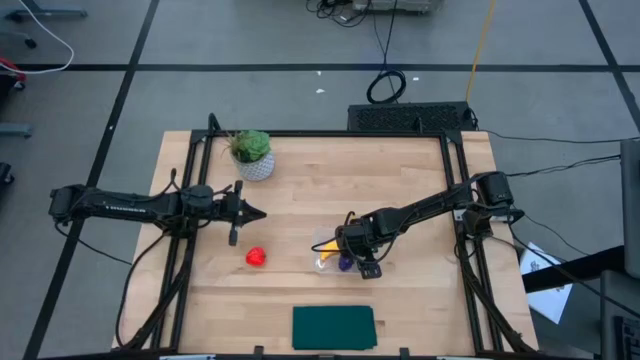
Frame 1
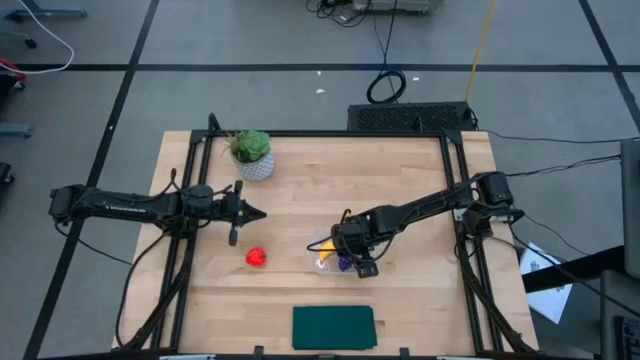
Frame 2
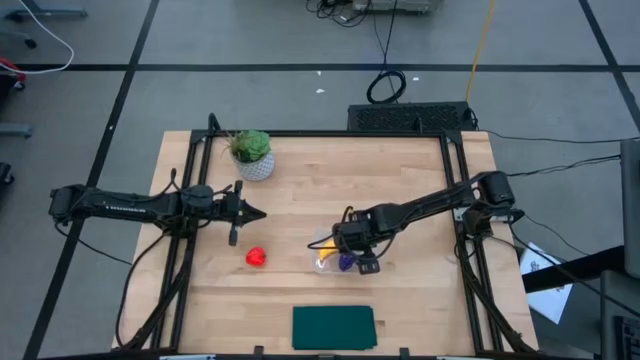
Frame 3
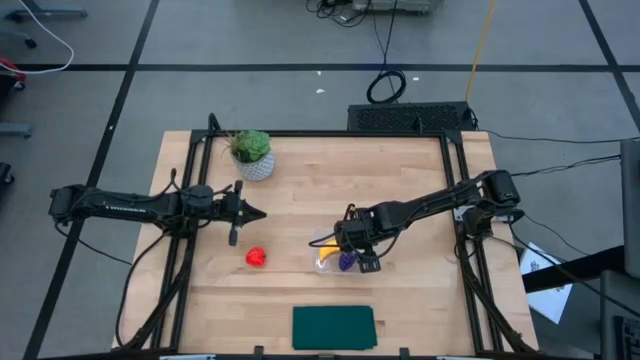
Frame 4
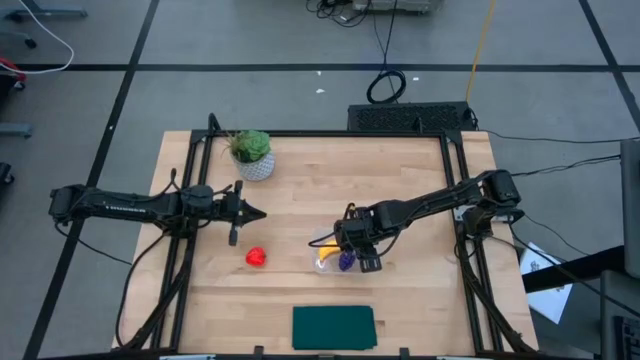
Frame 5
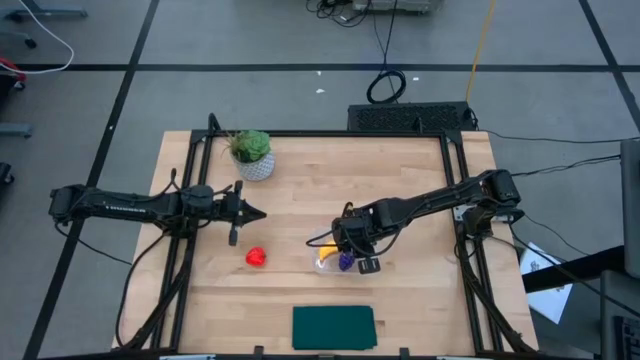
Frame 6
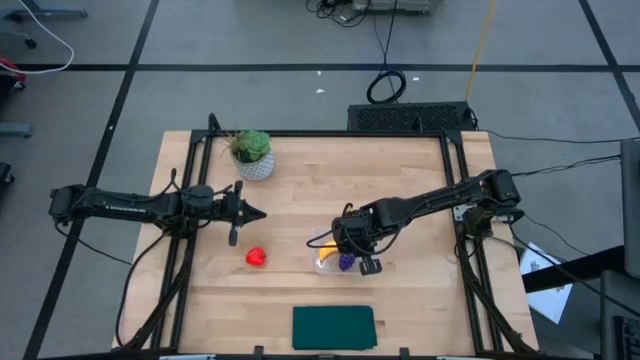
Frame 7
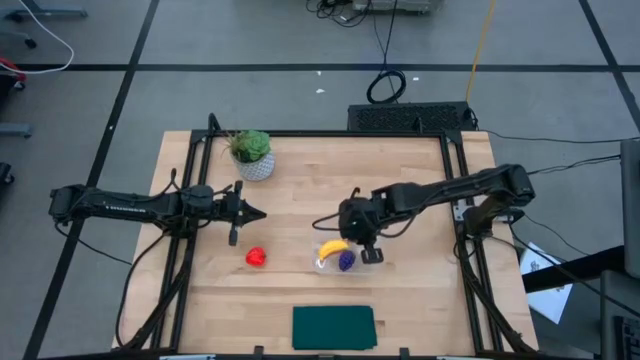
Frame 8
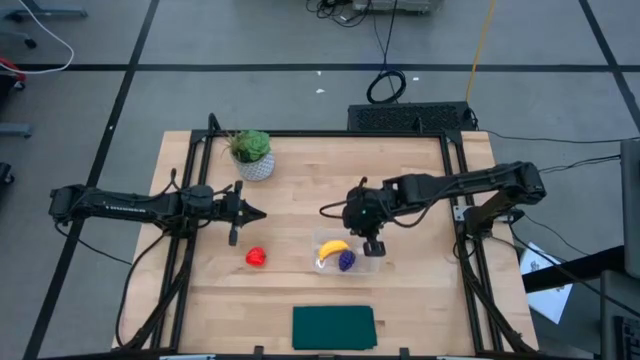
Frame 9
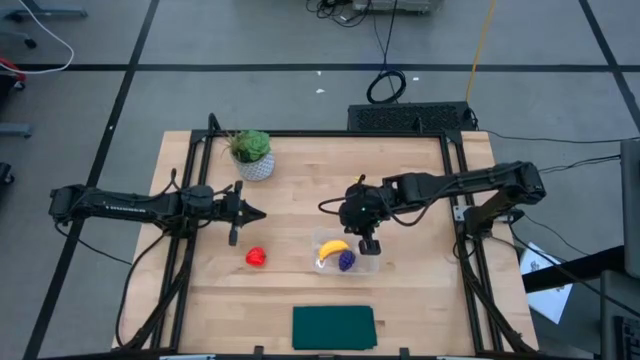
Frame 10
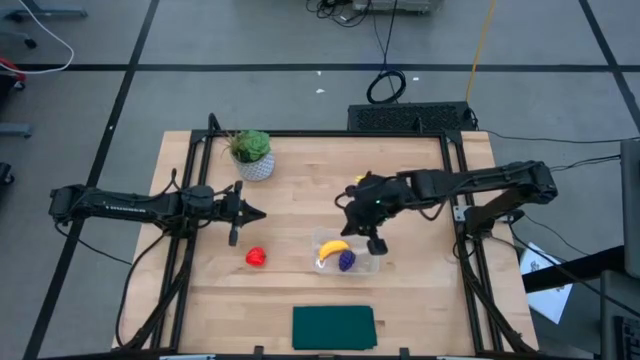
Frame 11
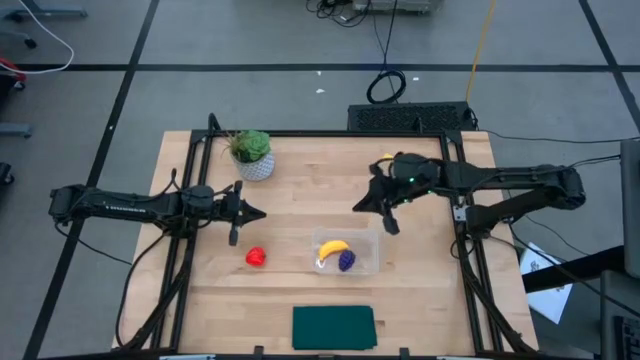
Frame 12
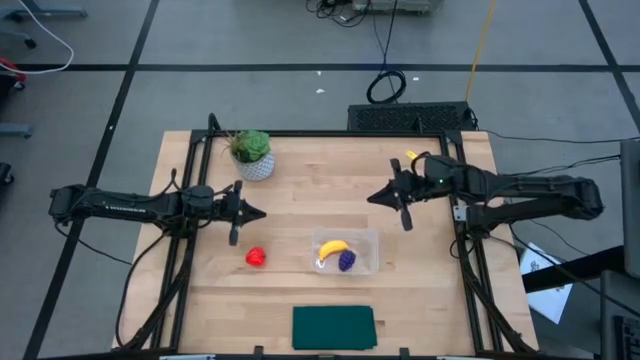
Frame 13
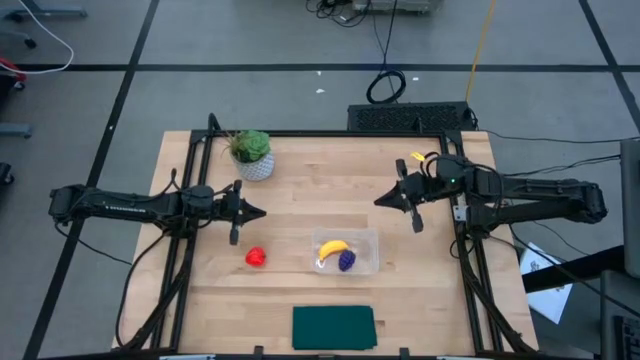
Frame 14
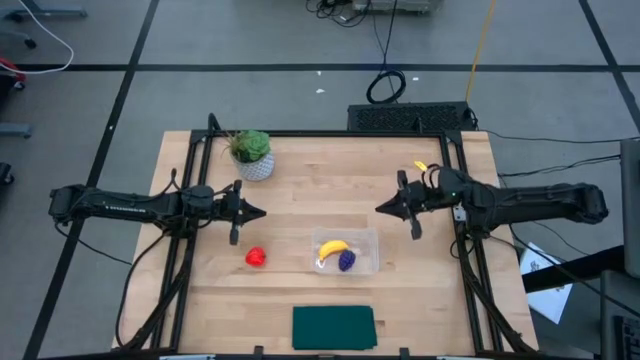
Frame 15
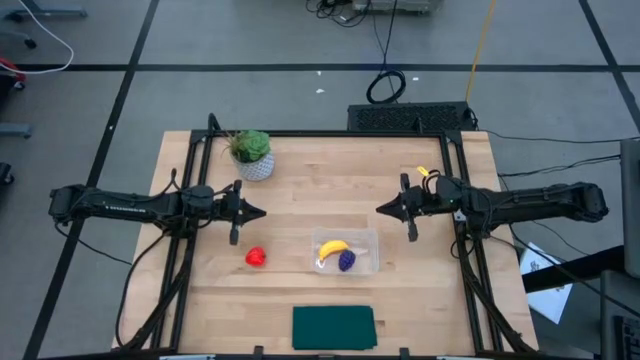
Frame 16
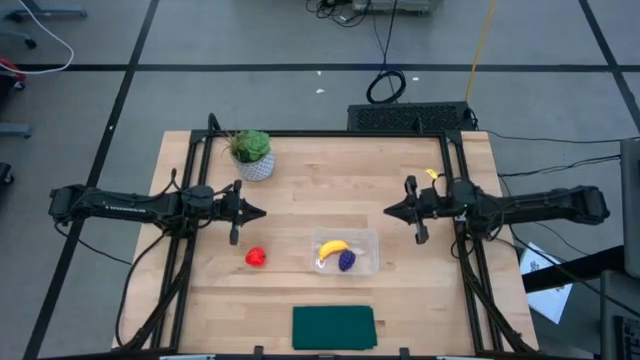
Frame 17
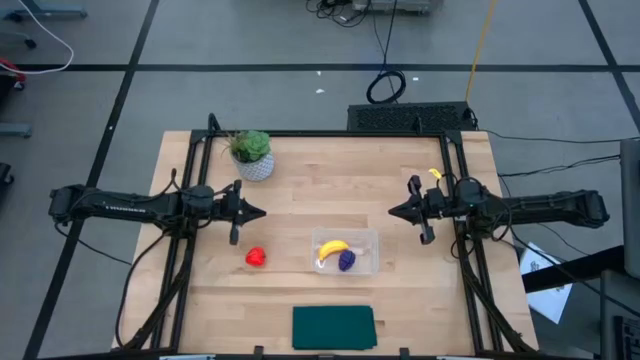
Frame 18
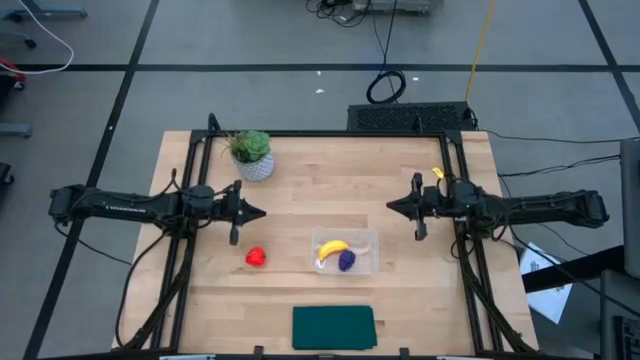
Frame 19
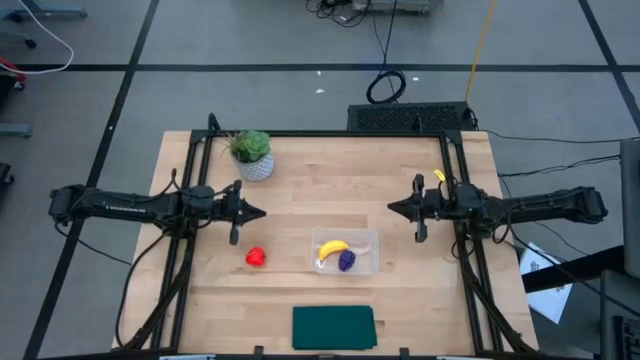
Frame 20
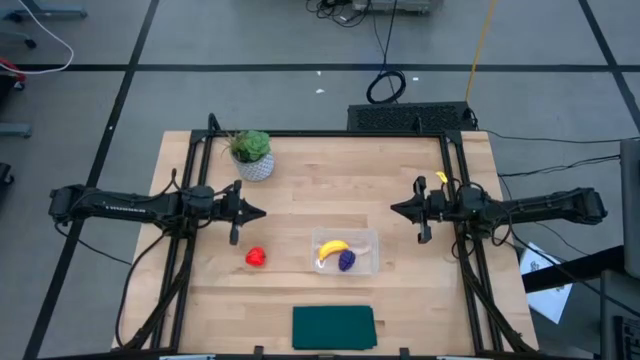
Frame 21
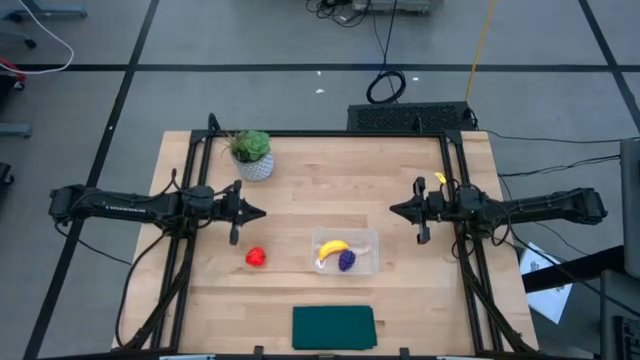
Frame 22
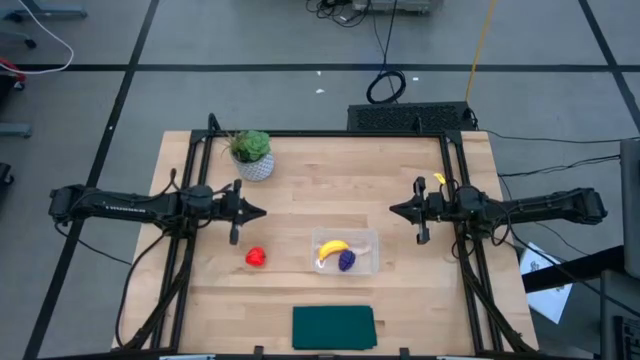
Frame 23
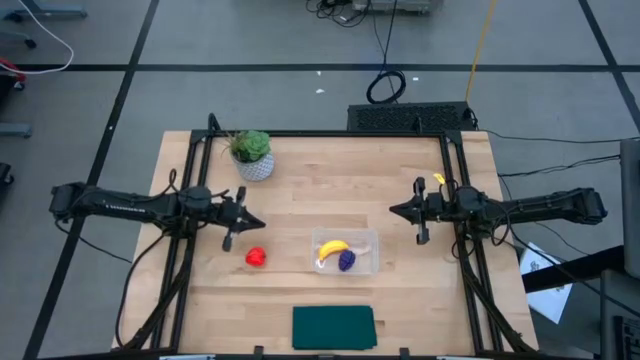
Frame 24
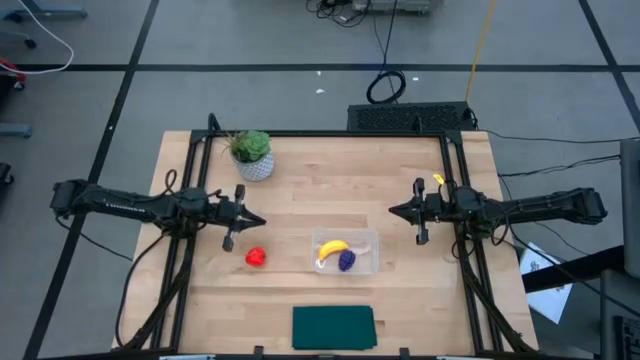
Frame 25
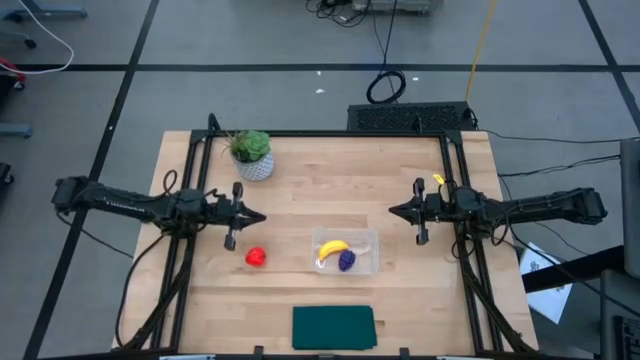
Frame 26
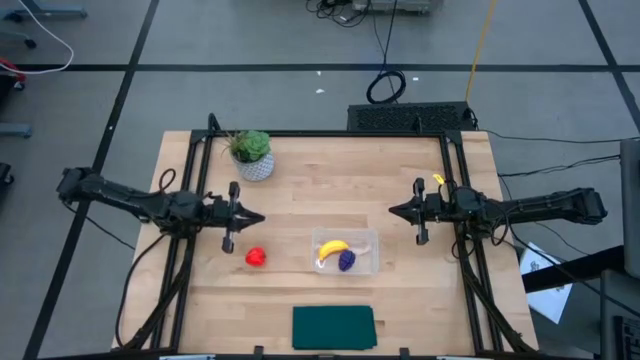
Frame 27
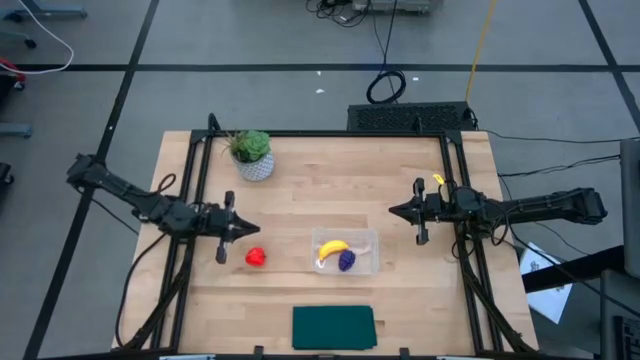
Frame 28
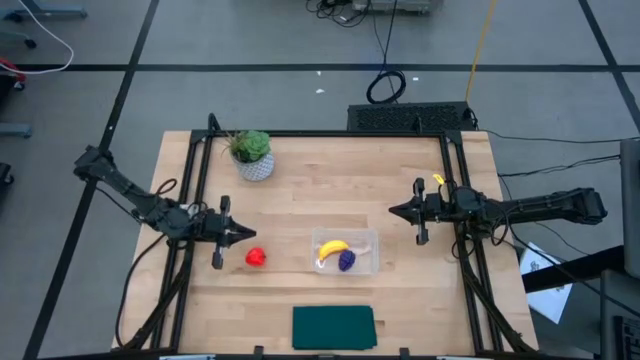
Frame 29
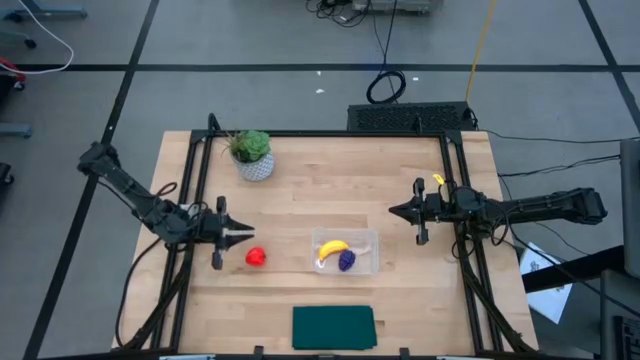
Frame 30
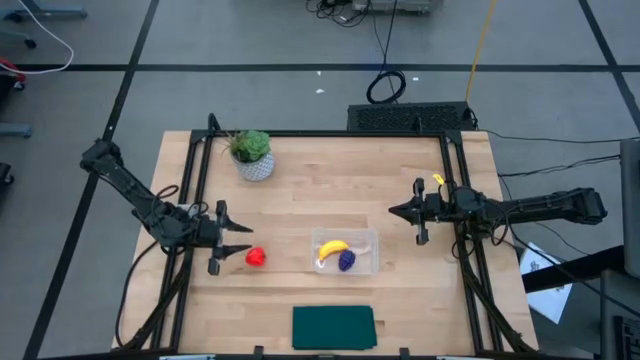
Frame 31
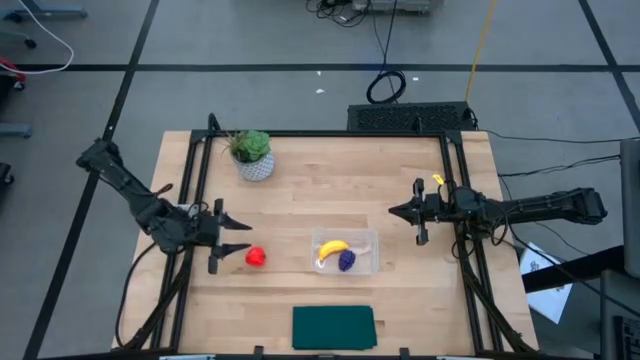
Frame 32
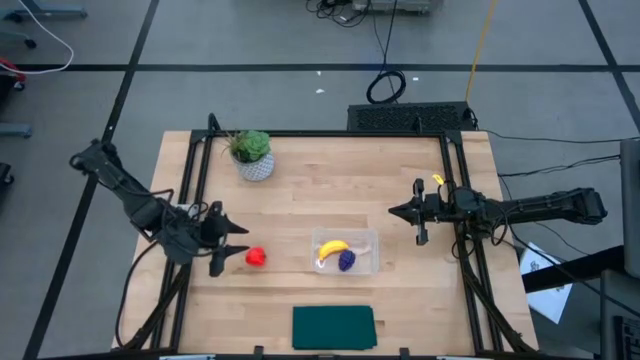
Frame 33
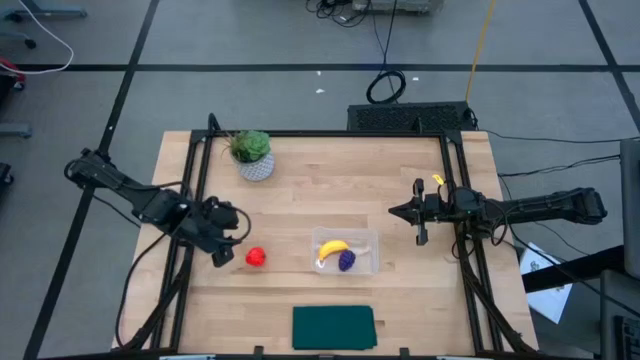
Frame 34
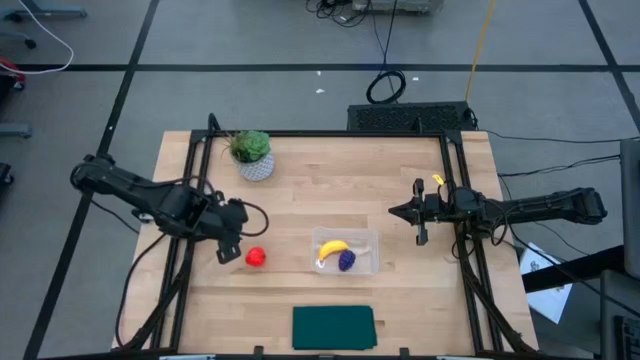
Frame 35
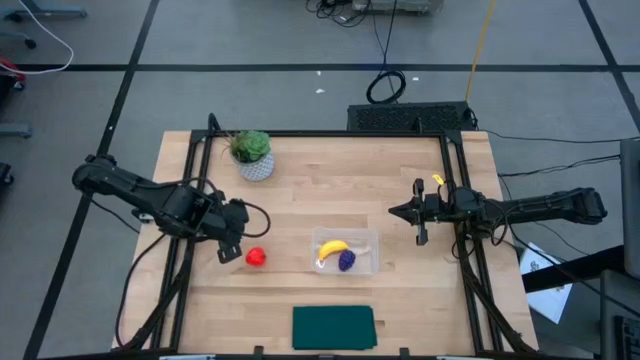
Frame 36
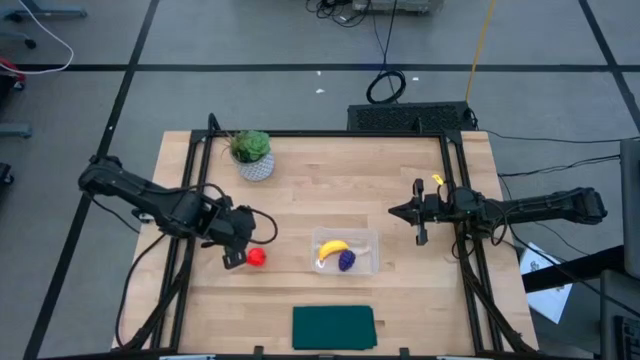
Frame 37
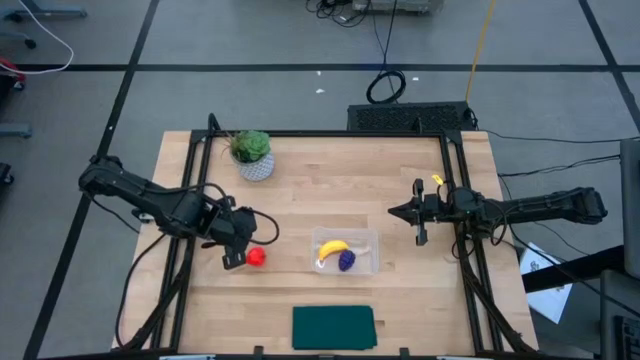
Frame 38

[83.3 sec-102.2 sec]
Task: Pick and placing Produce into tupperware
Put the apple into the transparent bin

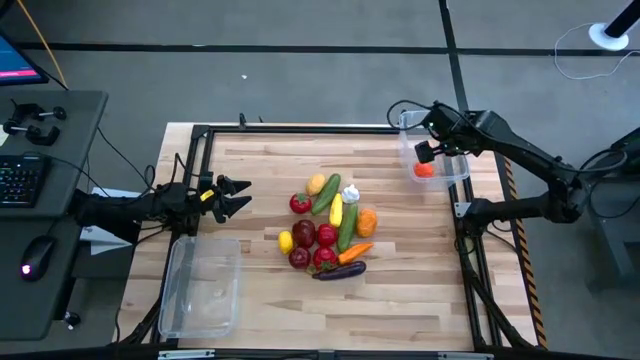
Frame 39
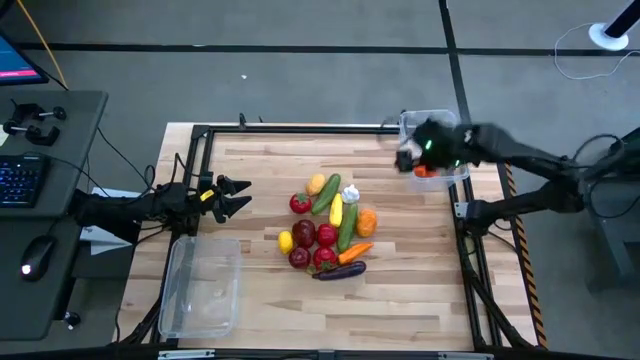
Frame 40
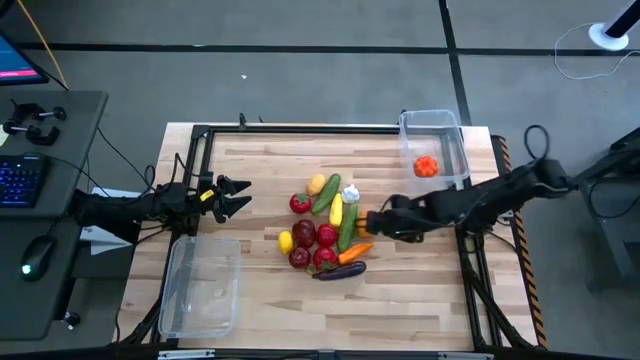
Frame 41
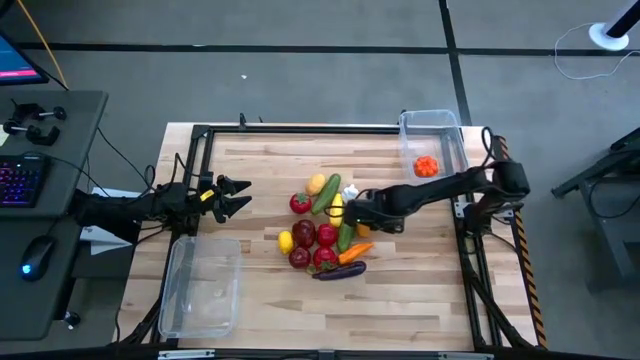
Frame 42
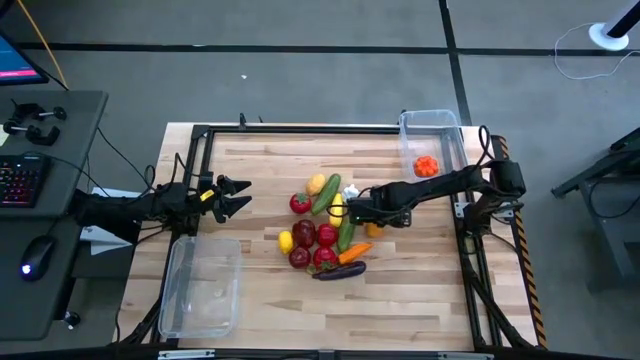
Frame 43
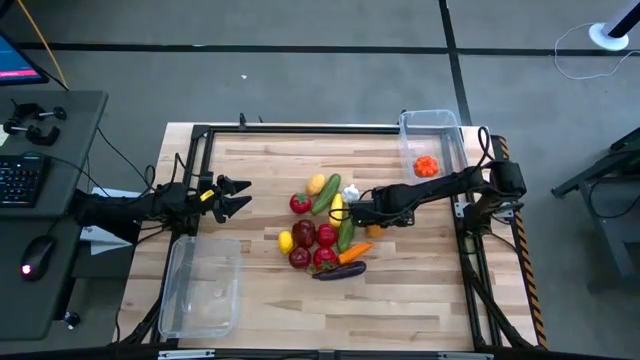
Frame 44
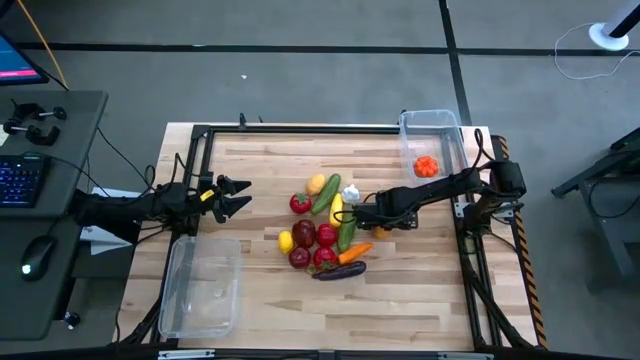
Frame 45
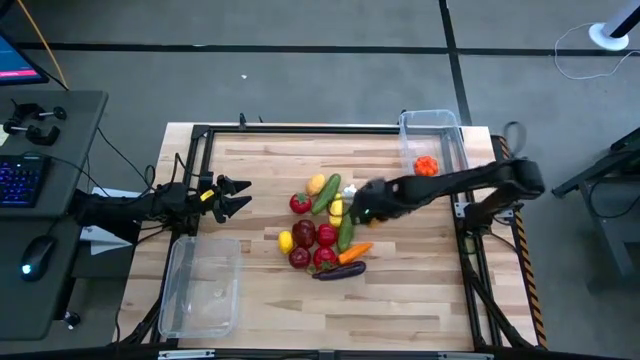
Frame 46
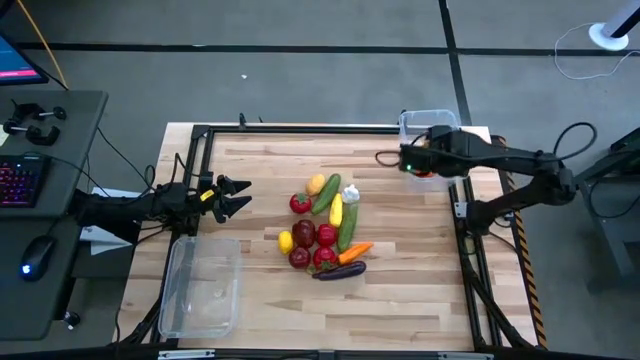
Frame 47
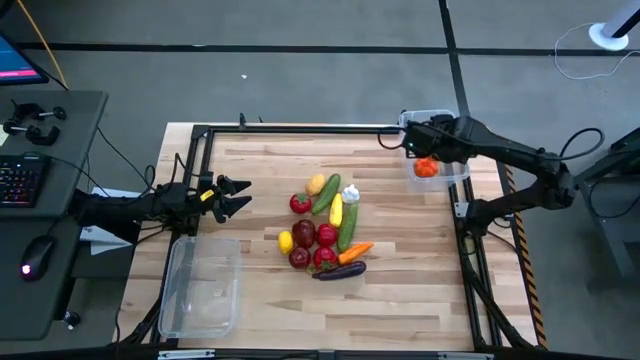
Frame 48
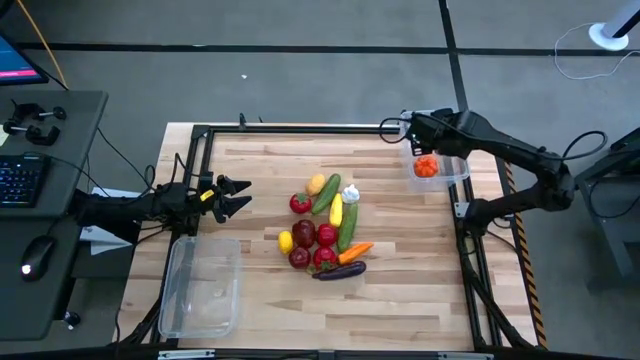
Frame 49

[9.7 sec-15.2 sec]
Task: Sort produce into baskets
Put the orange potato into the top transparent bin
